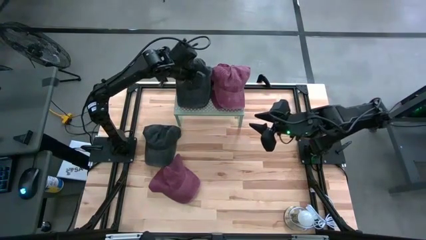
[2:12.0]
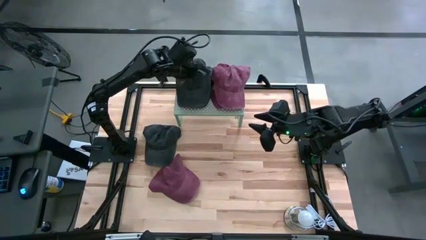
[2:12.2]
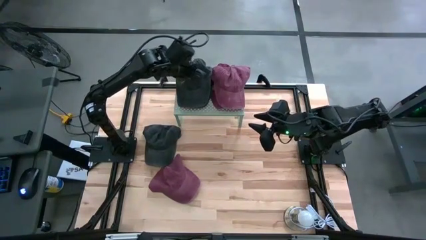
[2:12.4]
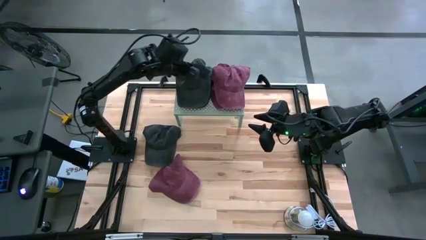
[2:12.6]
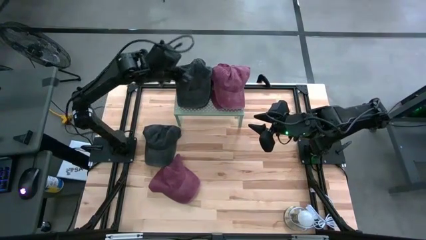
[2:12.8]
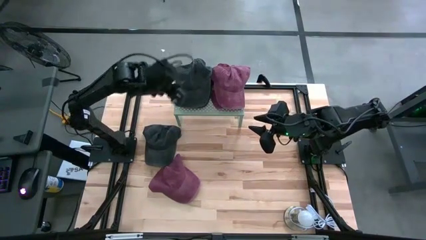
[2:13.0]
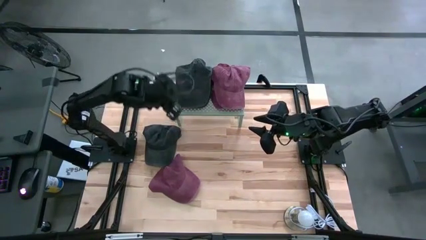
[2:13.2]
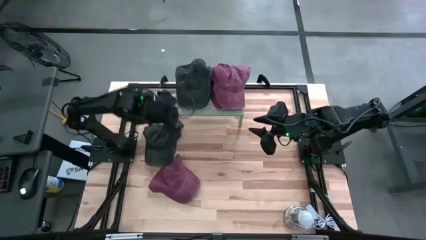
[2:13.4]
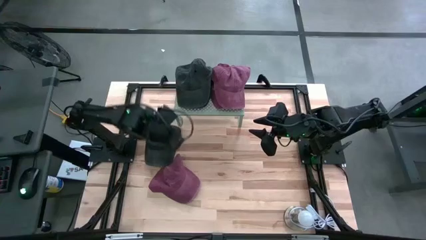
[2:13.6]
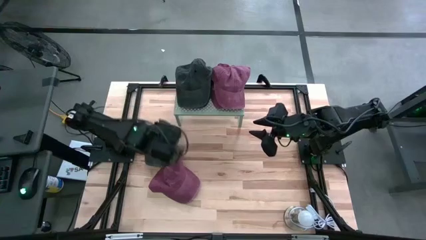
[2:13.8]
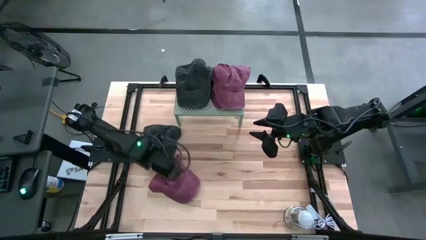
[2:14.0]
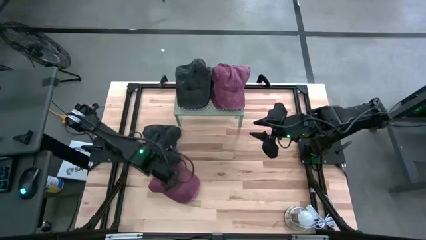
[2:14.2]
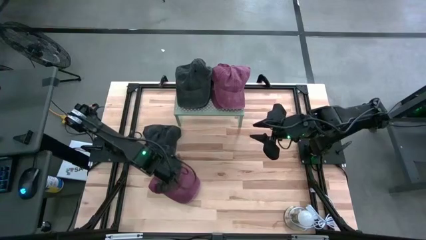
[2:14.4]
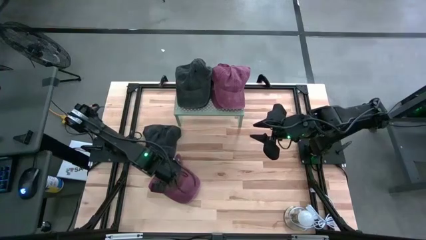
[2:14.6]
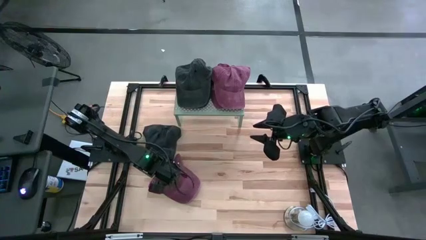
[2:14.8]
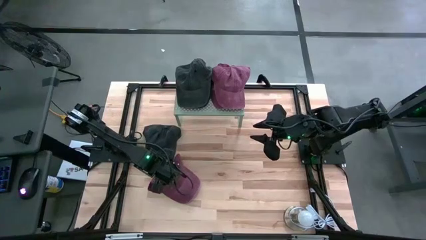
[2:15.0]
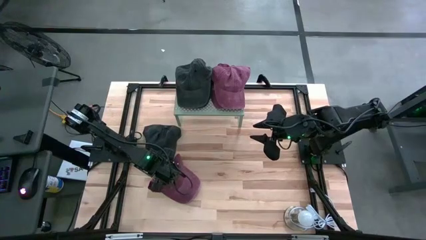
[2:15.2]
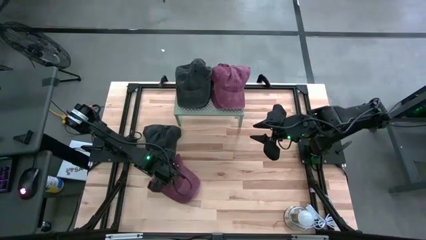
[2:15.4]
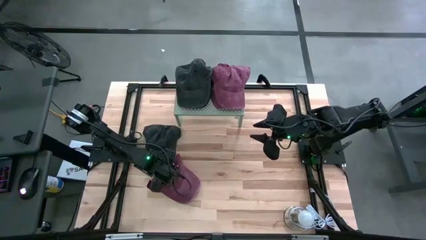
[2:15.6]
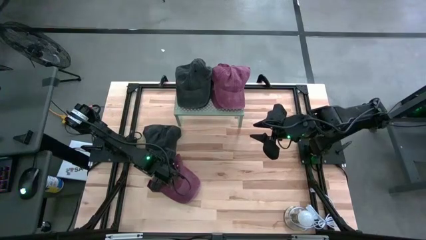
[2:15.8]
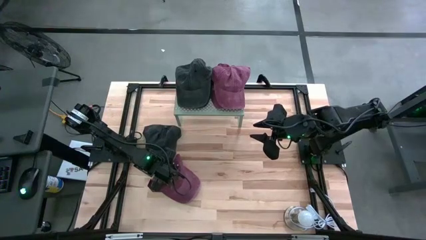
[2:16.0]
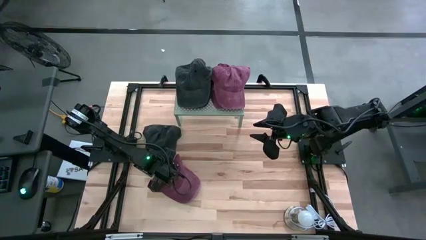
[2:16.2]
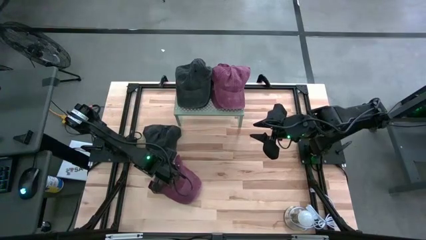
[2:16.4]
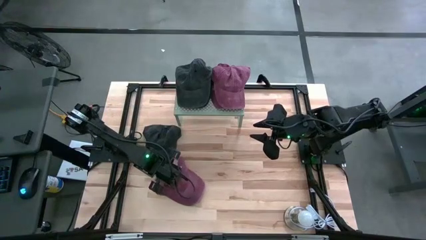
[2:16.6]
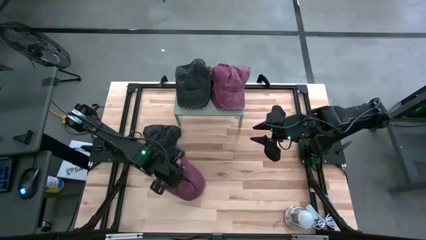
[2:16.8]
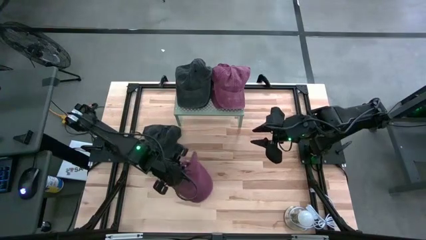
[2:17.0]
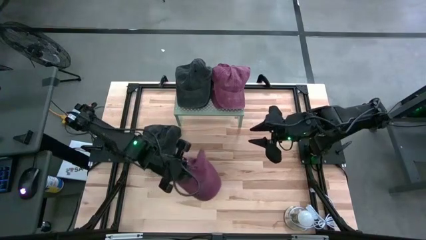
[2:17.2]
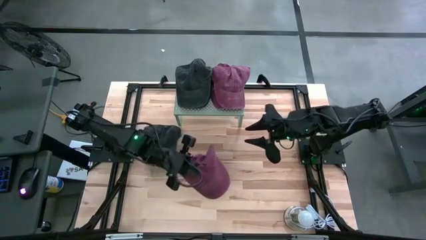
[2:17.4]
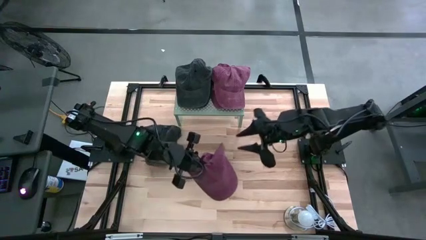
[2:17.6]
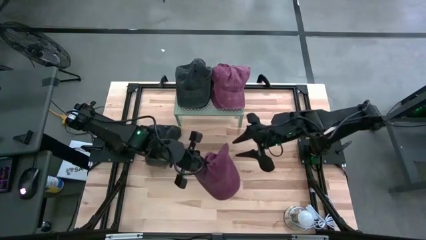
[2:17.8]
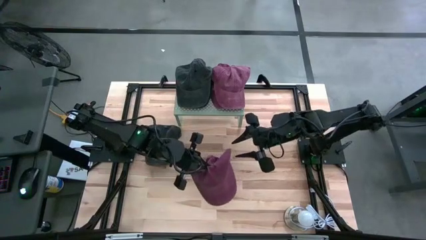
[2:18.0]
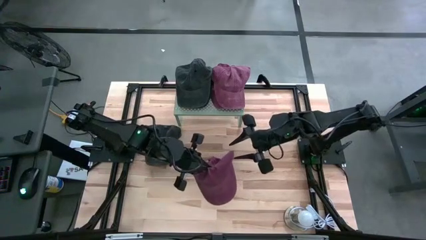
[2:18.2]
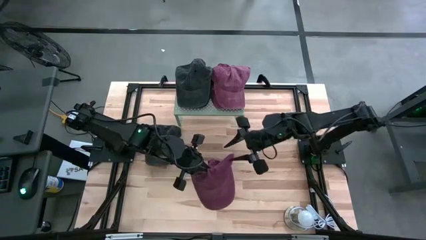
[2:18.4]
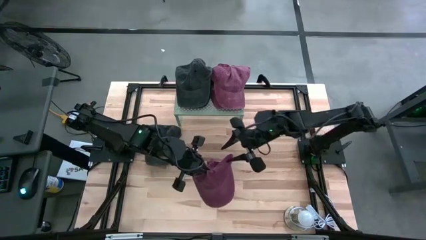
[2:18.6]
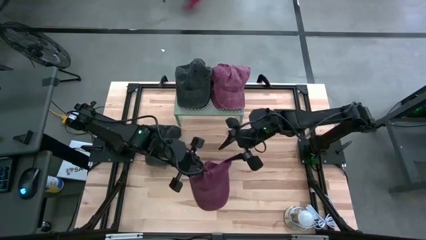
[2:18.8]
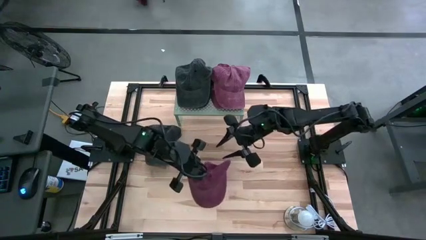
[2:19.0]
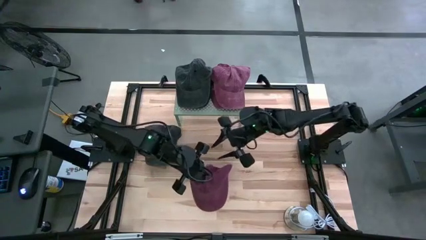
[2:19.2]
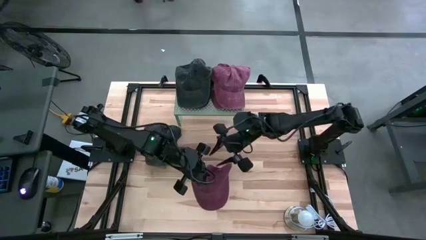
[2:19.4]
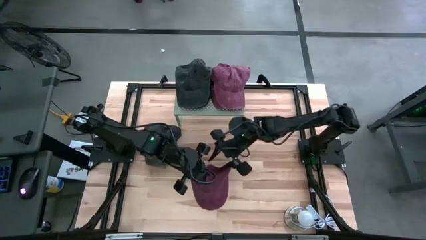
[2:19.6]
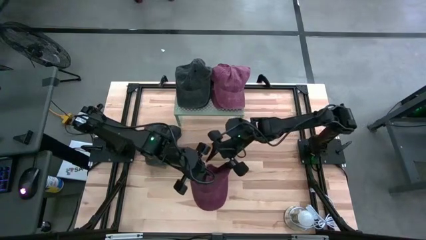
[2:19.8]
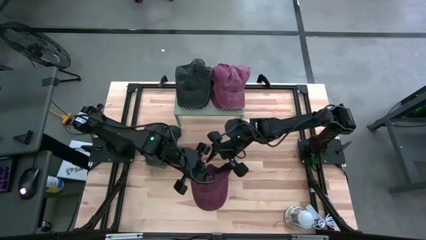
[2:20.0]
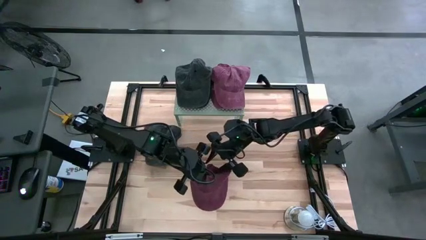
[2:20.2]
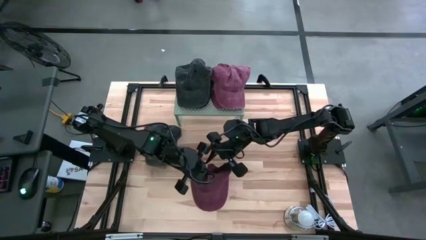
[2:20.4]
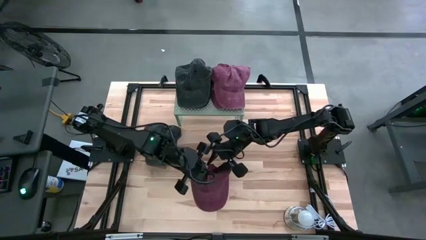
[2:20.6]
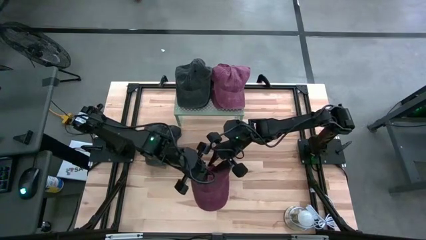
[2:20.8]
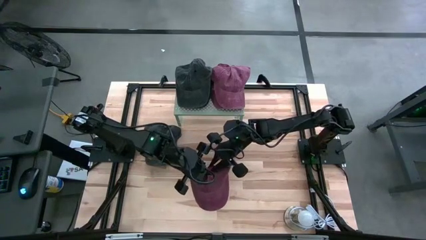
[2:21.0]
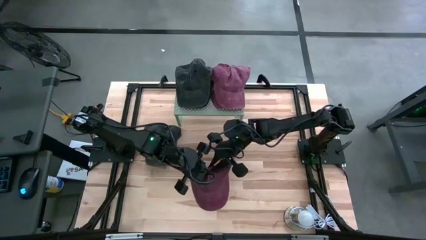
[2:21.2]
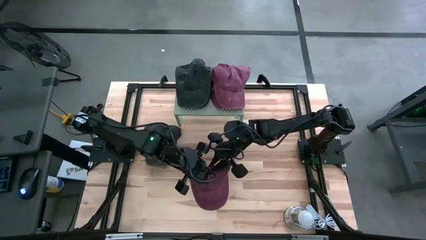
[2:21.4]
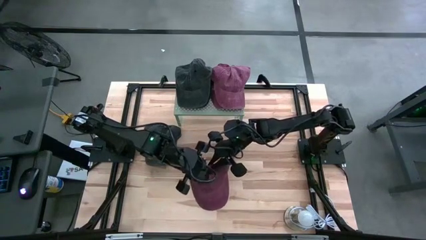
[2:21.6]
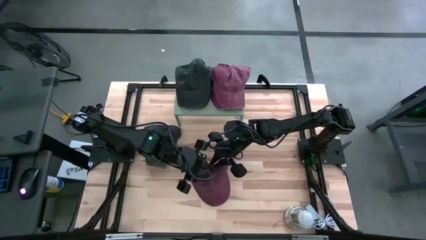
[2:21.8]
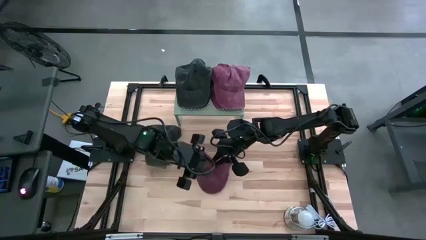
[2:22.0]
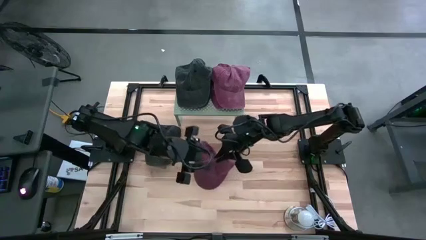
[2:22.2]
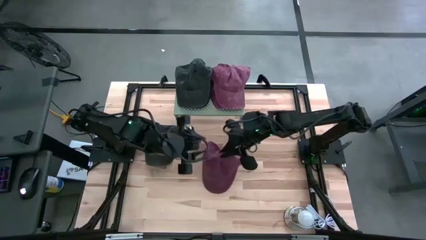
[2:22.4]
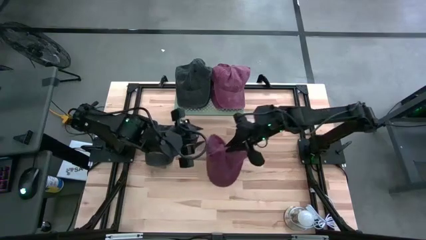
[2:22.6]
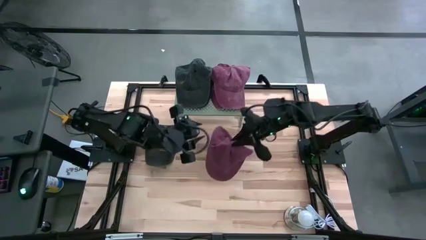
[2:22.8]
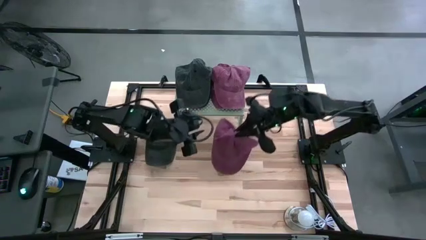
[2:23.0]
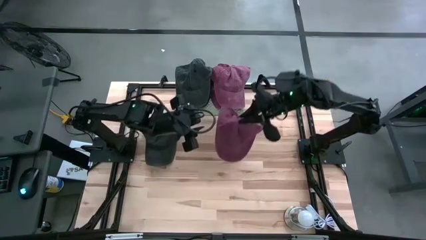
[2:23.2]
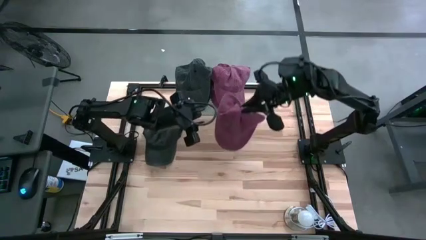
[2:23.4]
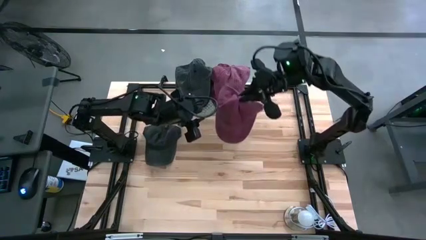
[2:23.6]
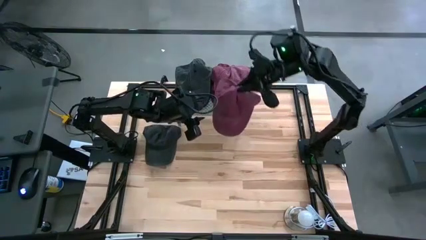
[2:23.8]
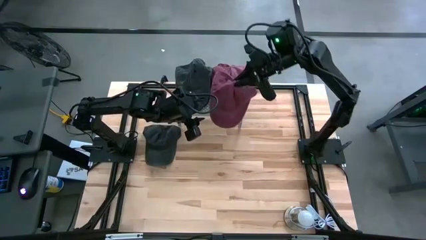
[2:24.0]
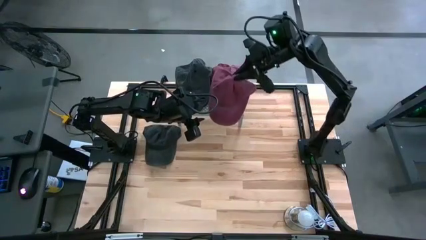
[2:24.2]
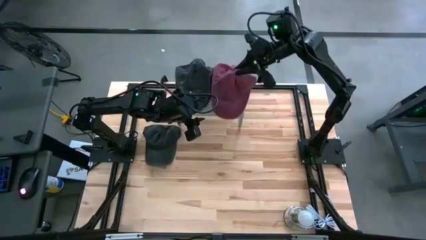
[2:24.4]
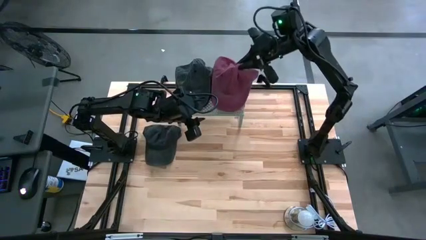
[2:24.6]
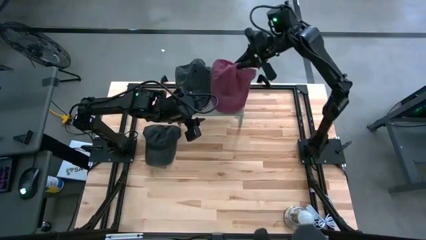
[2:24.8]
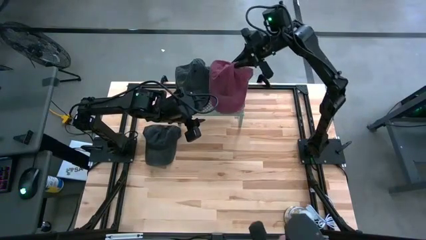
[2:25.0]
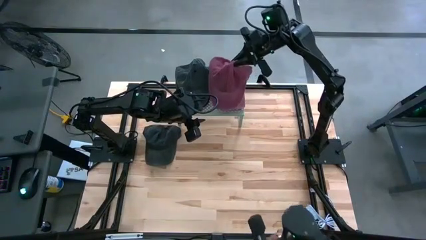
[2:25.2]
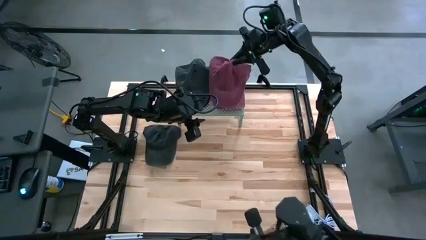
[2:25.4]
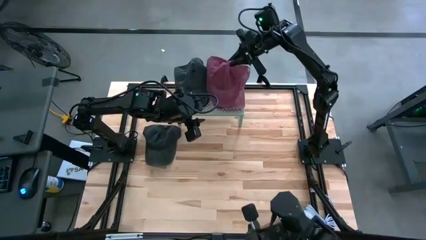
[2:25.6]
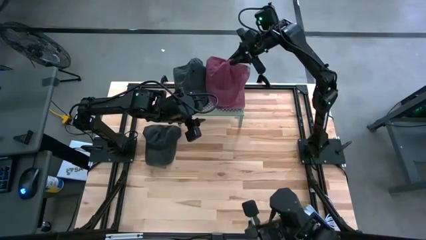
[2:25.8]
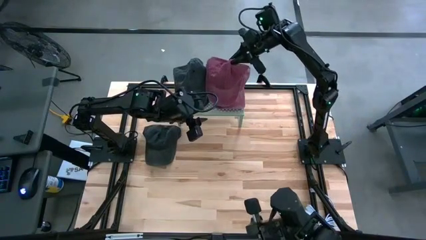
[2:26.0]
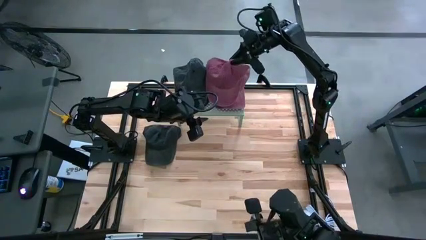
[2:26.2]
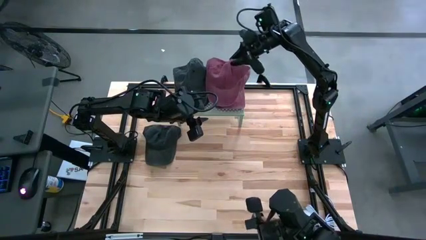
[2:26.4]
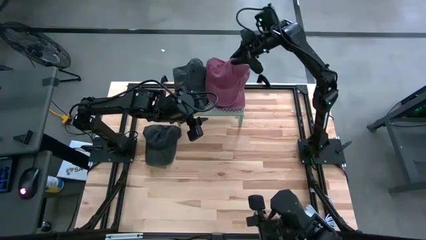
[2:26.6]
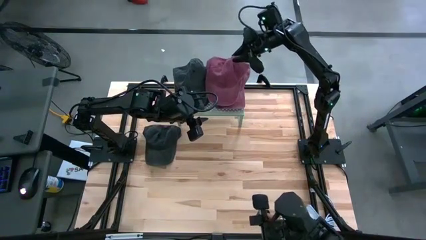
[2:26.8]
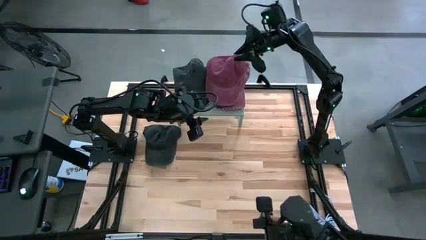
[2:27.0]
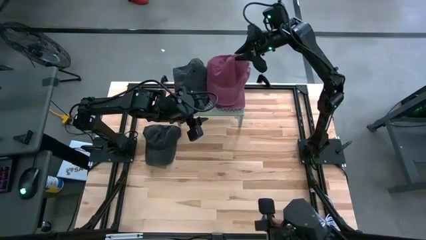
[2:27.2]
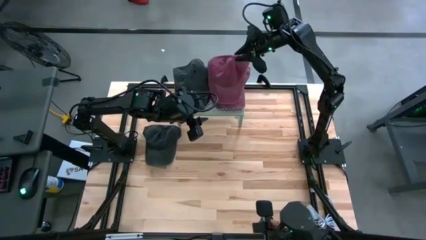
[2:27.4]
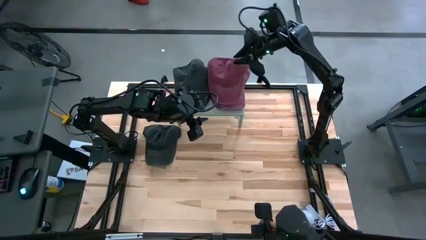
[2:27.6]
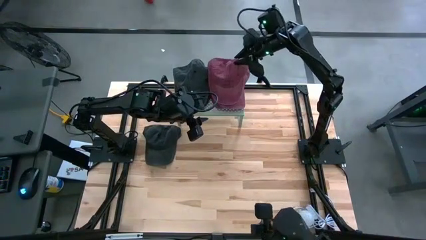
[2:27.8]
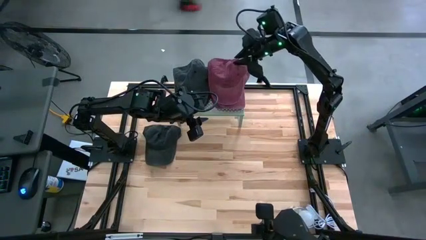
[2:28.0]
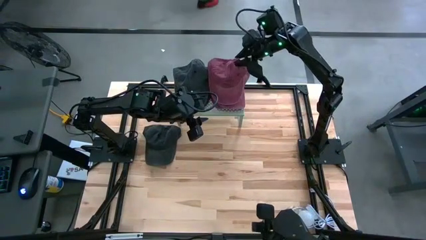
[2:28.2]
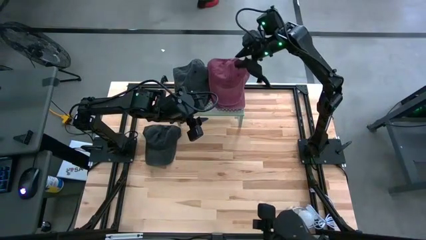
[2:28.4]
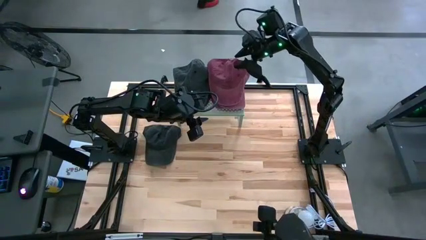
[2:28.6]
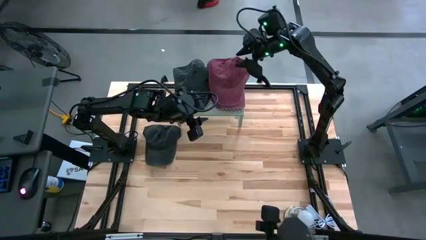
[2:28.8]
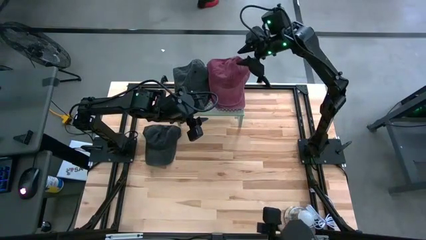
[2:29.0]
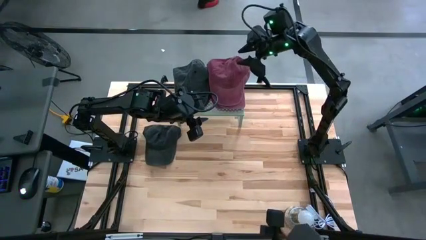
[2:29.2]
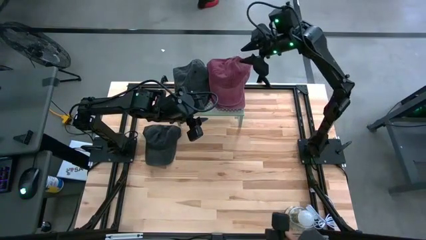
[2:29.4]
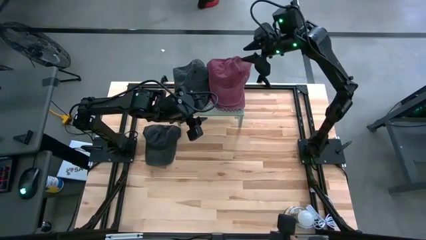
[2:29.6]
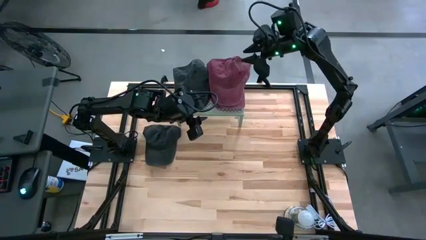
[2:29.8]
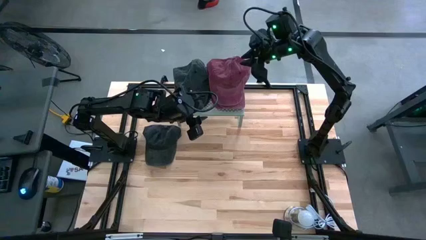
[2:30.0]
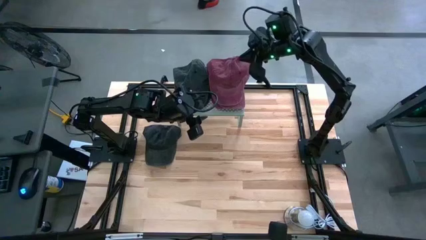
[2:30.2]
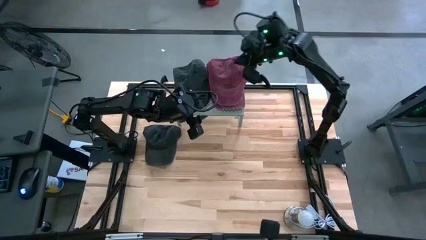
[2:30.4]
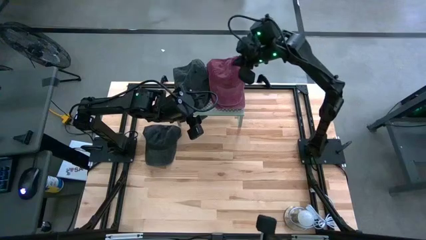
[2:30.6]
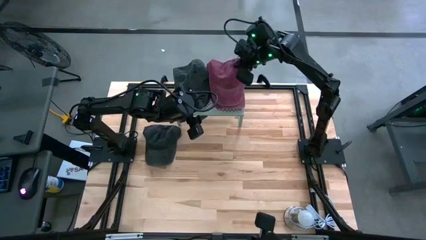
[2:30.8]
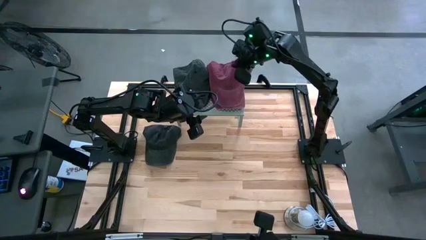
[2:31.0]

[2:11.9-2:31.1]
Task: Pick & Place hat
Stack the maroon cap on top of the maroon caps on the shelf
